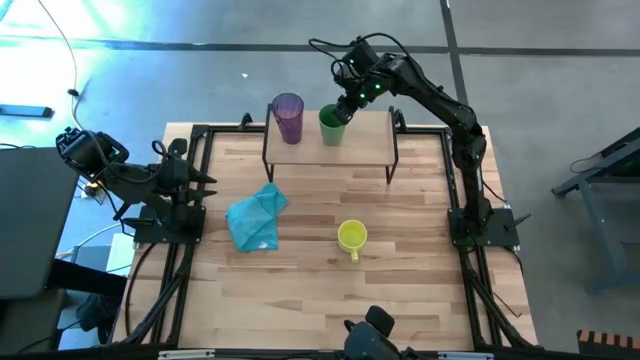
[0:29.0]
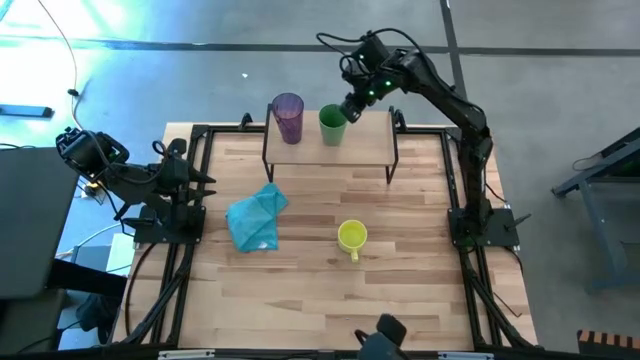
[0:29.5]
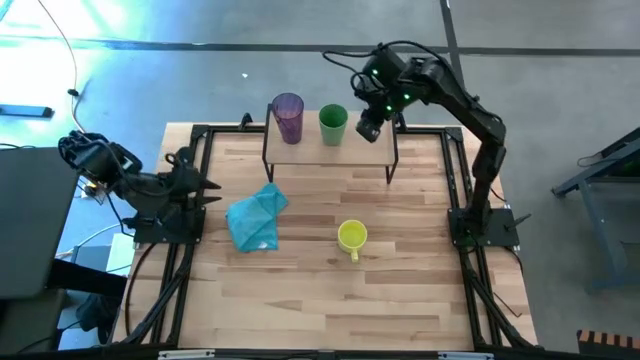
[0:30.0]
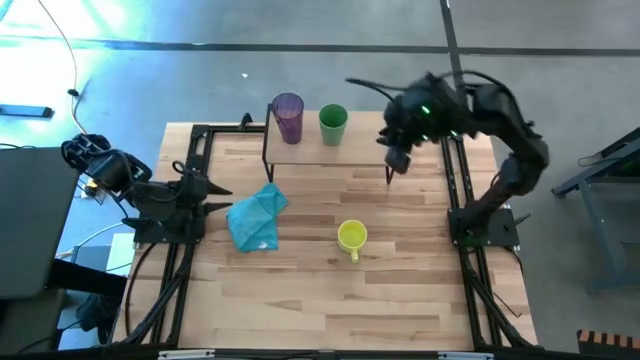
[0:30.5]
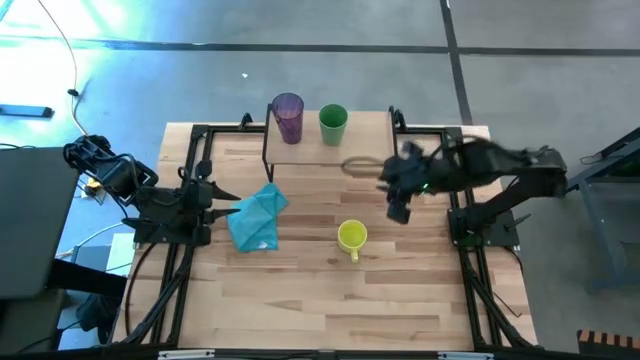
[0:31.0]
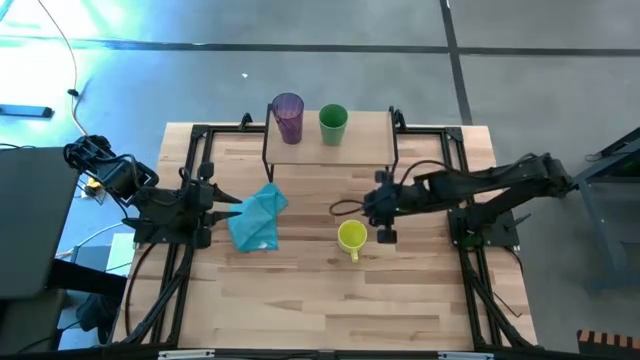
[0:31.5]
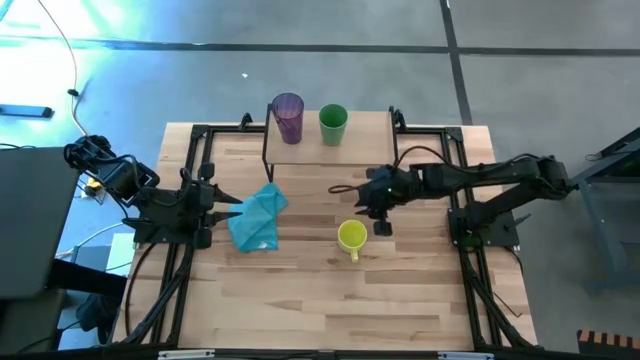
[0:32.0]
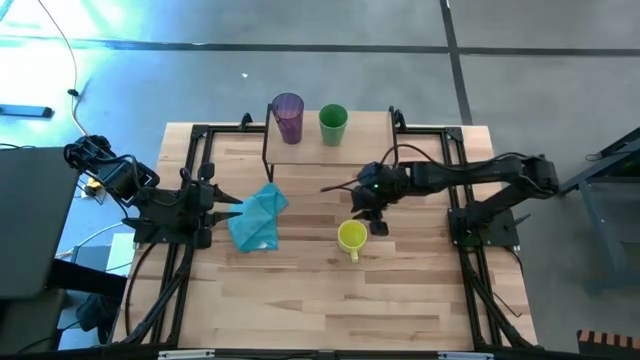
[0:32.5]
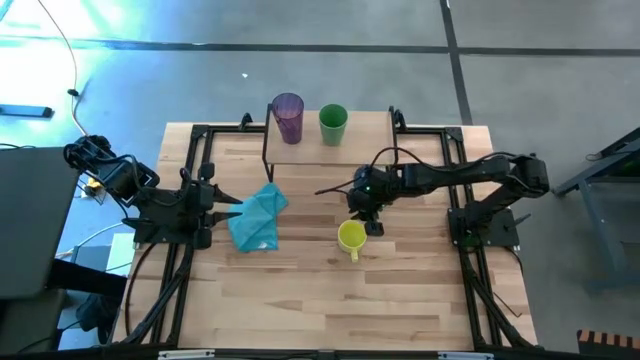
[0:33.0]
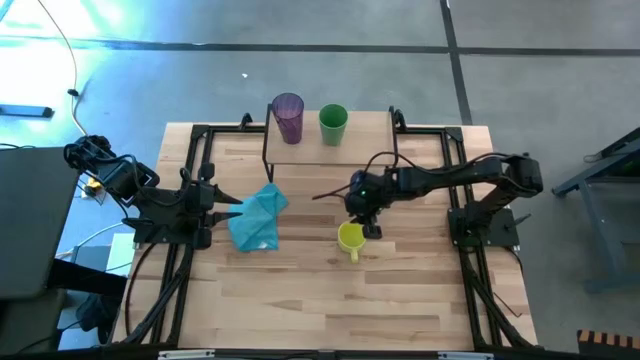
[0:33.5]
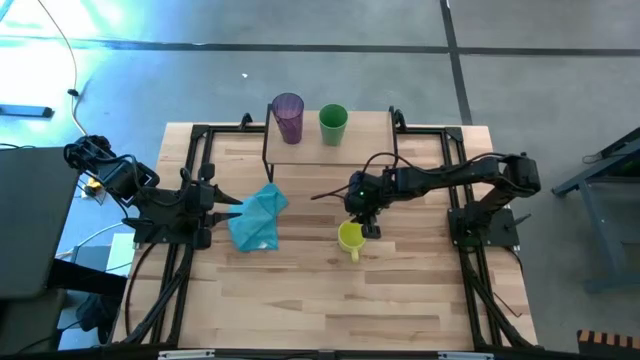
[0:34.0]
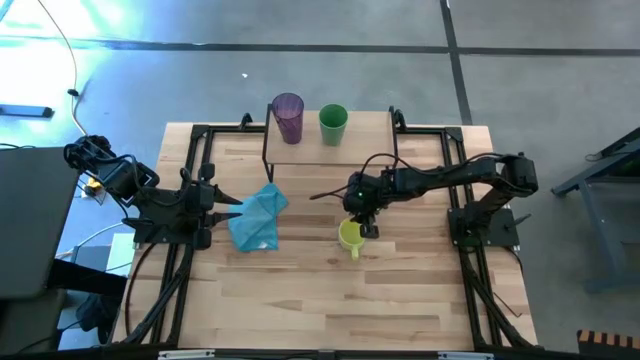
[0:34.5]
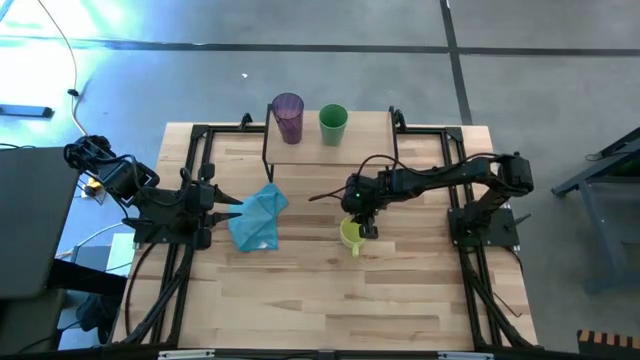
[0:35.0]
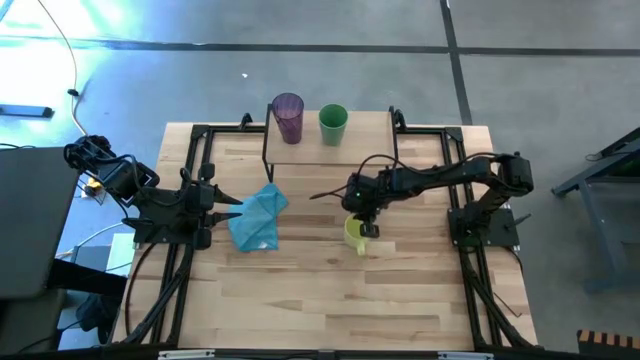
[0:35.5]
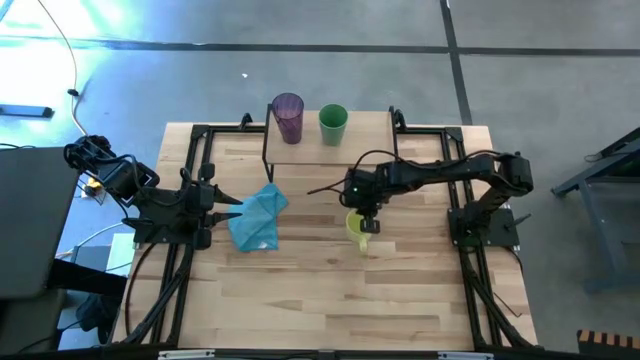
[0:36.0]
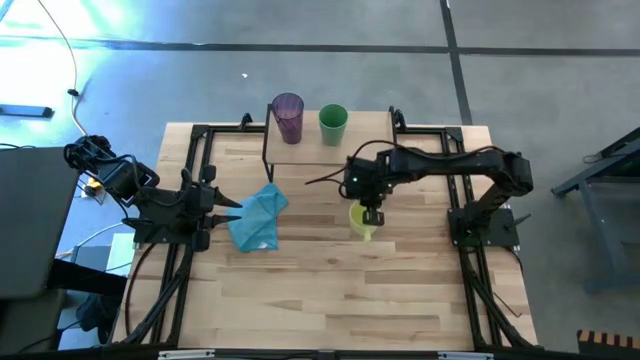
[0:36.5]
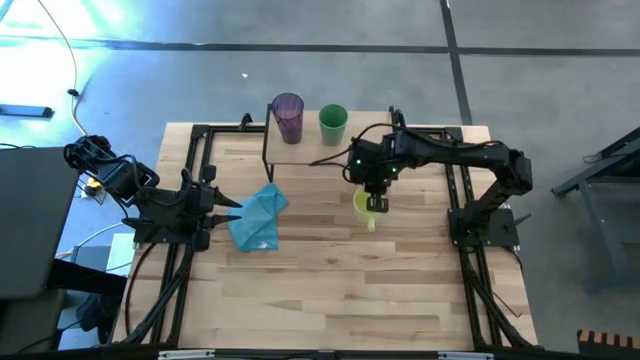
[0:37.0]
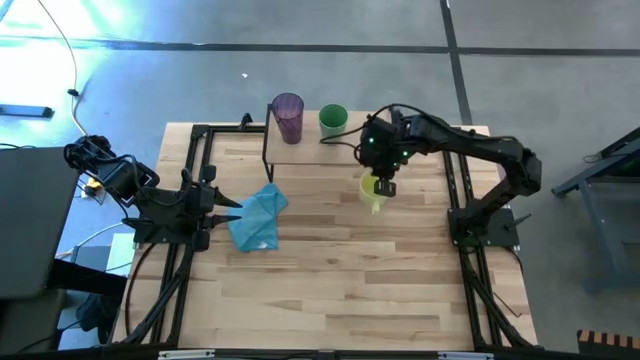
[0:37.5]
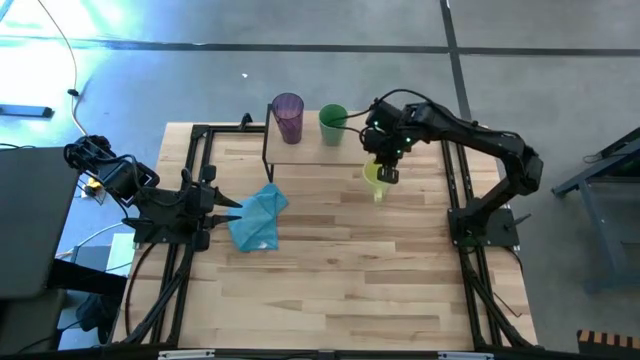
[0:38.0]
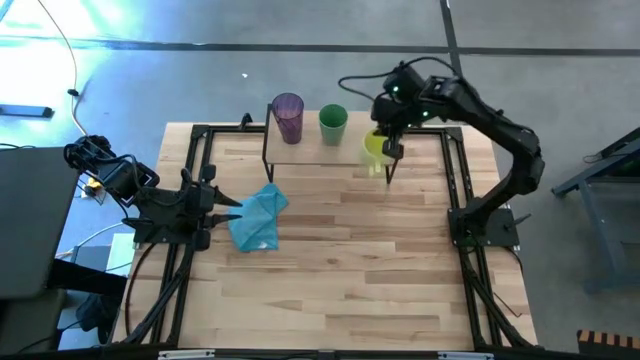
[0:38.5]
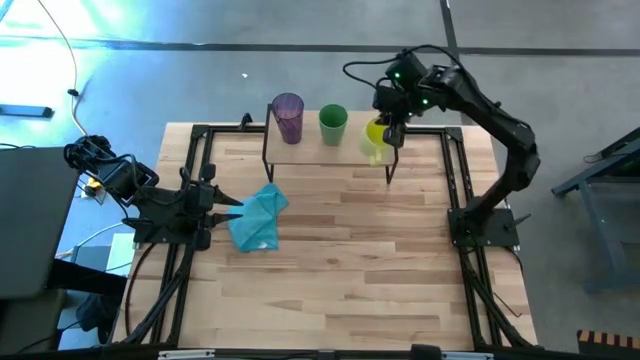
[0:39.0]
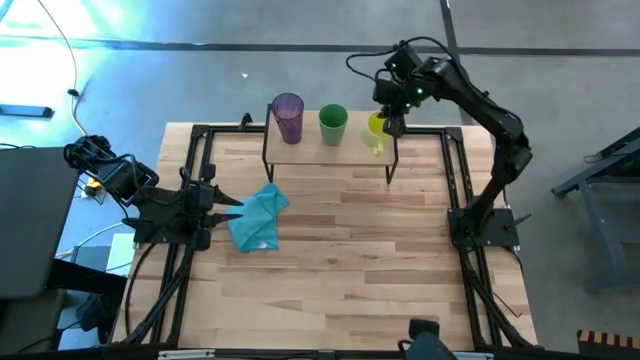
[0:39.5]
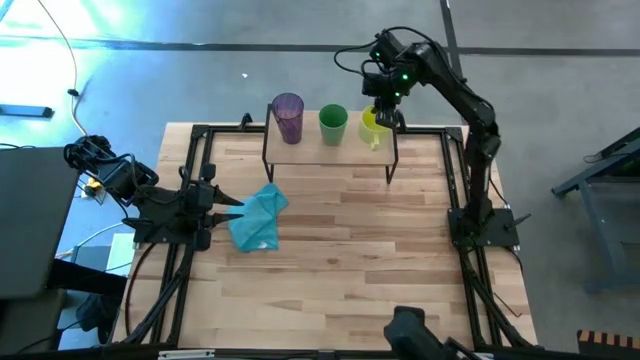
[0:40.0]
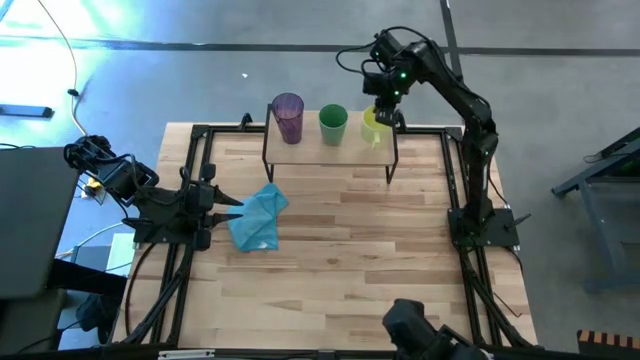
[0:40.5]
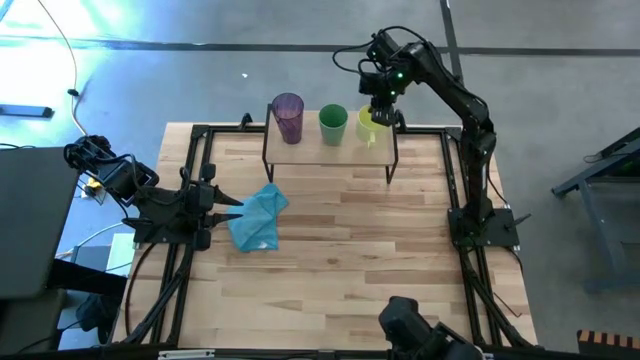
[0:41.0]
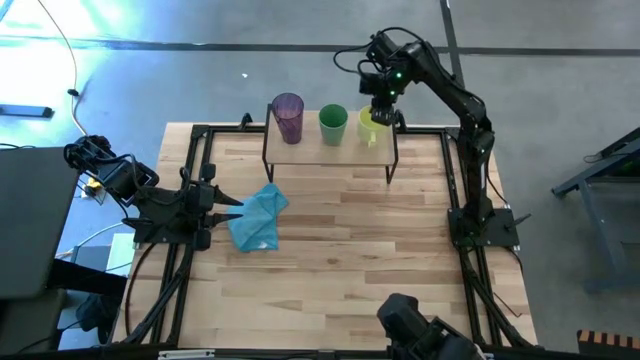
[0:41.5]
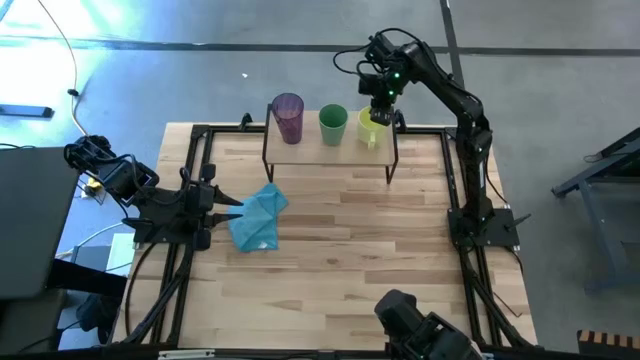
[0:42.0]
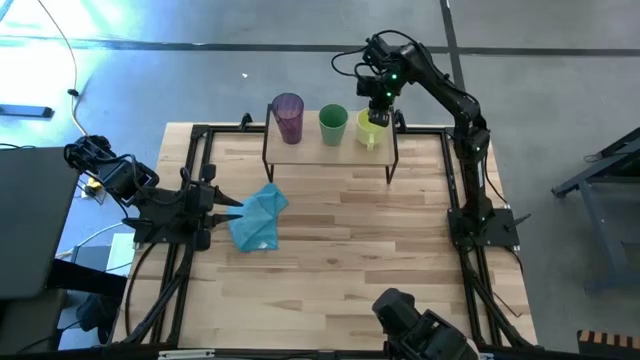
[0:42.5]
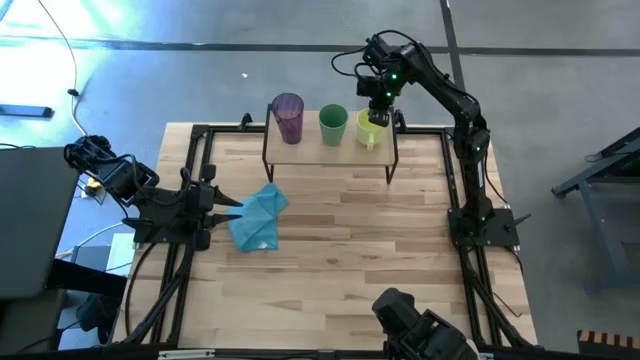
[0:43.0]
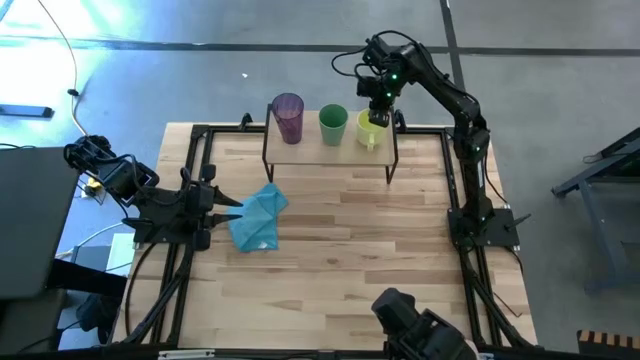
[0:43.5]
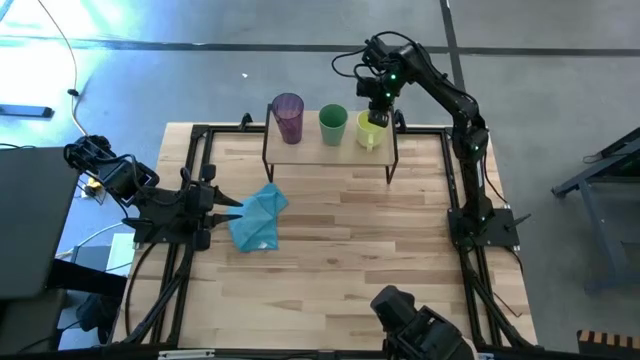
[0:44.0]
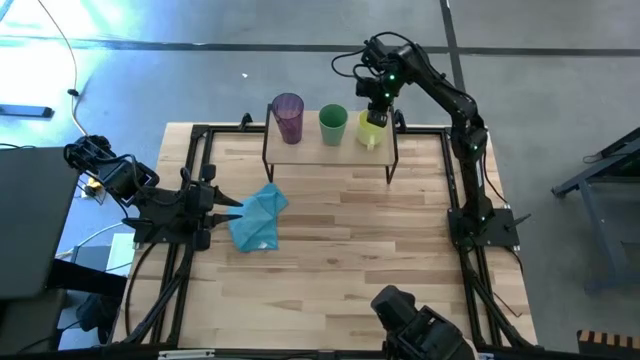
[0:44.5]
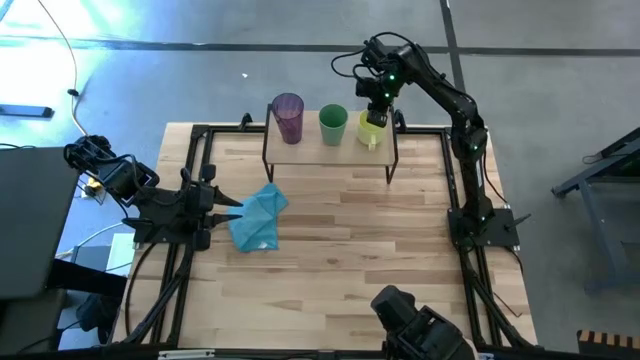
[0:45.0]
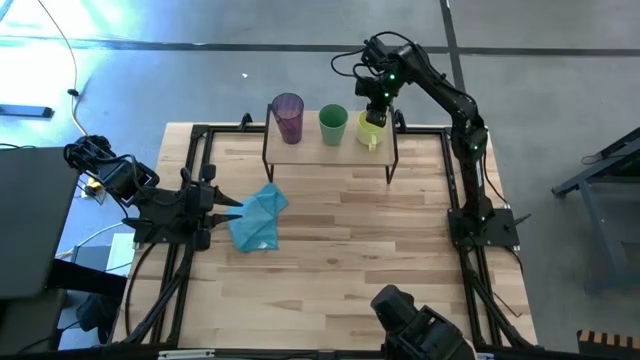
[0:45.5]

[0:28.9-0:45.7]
Task: Stack small to large cups/mugs on shelf
Put the yellow mug on the shelf

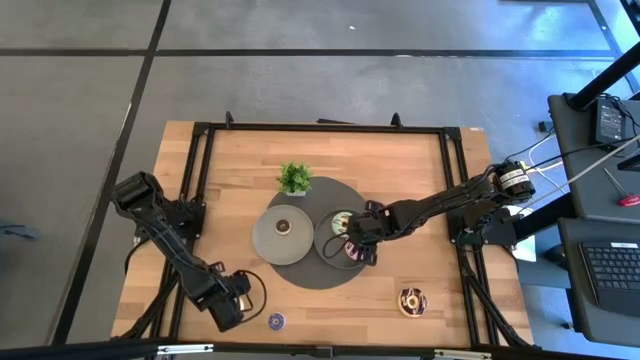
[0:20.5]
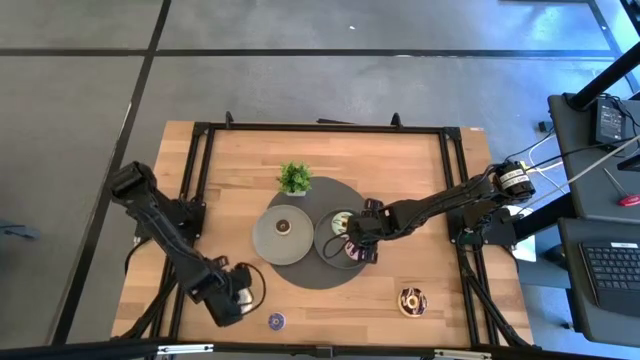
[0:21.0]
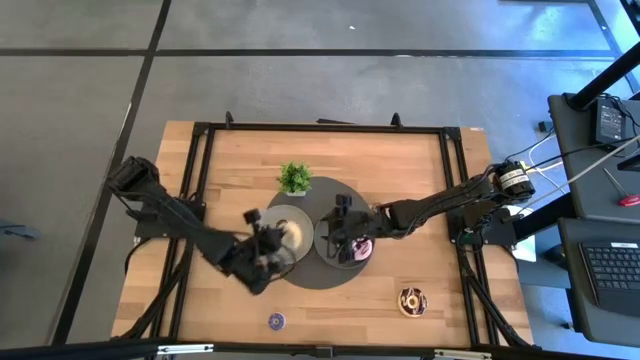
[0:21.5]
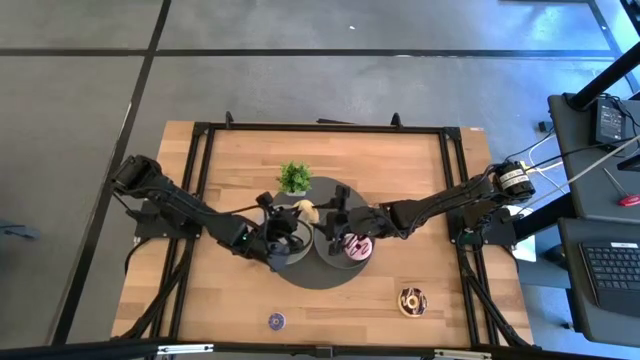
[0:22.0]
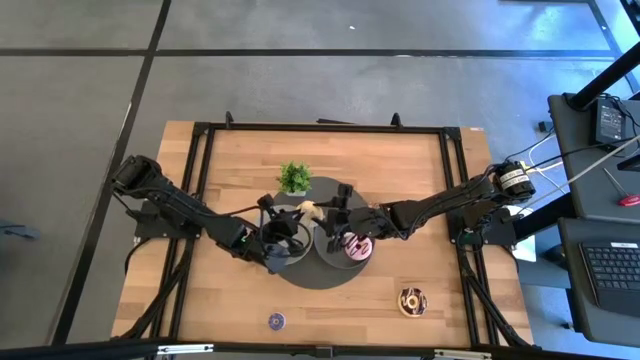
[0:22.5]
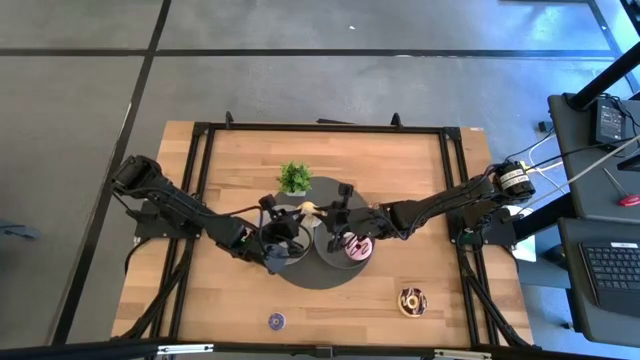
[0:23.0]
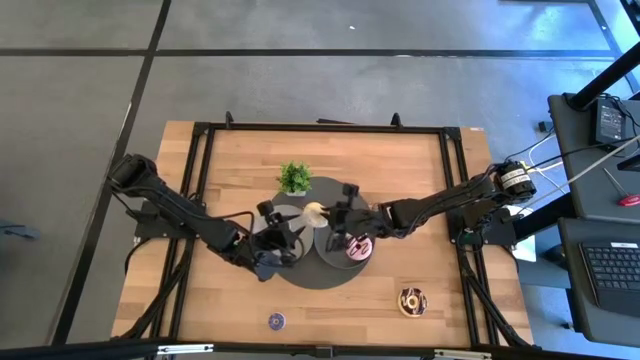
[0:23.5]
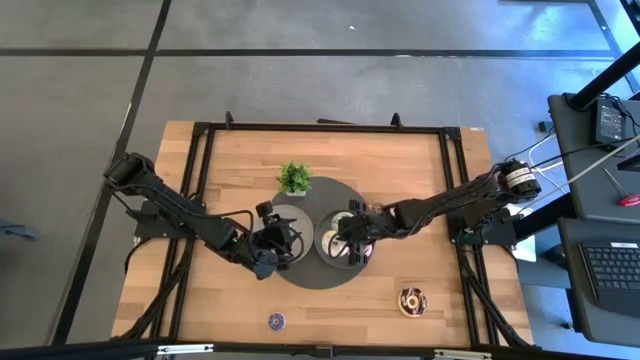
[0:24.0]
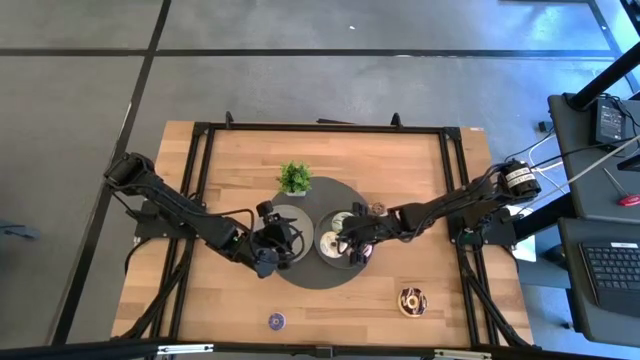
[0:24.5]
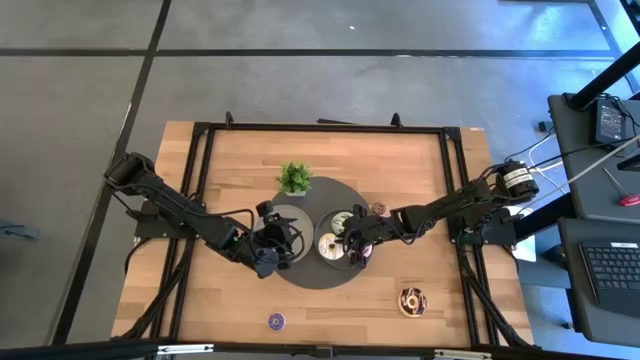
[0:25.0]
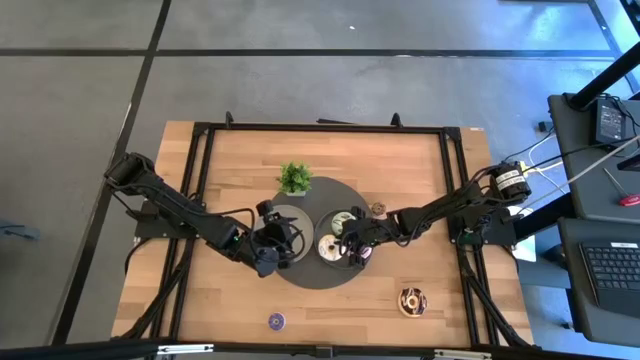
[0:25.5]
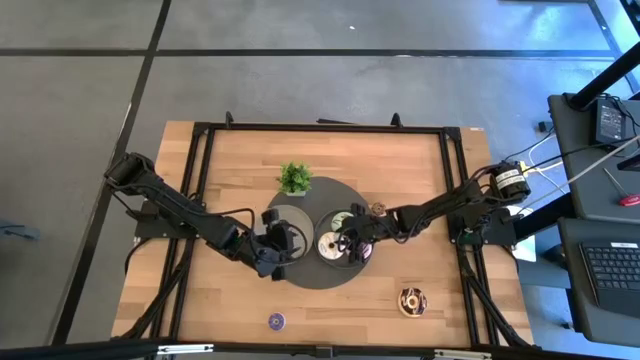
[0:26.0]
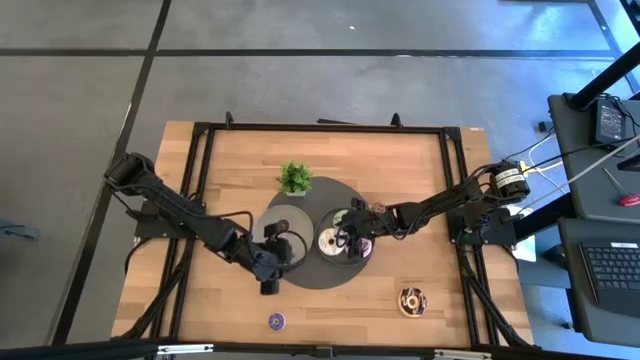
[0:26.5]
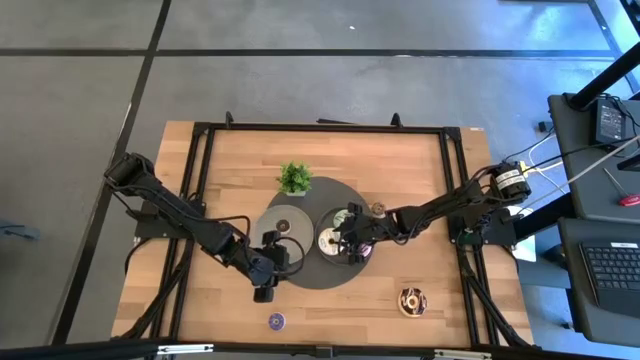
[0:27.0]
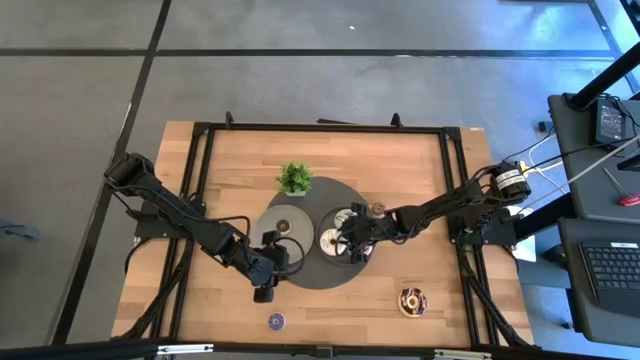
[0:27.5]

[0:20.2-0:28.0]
Task: Pick & Place donuts
Put the large white donut on the black plate
